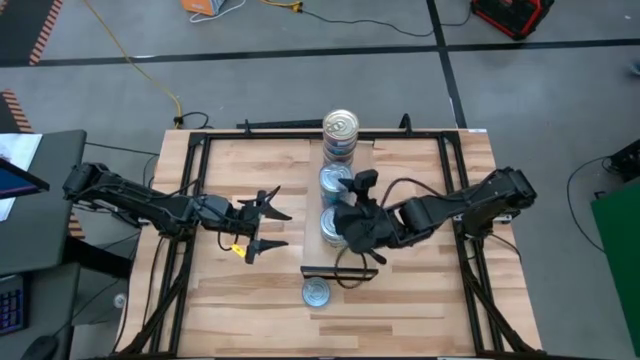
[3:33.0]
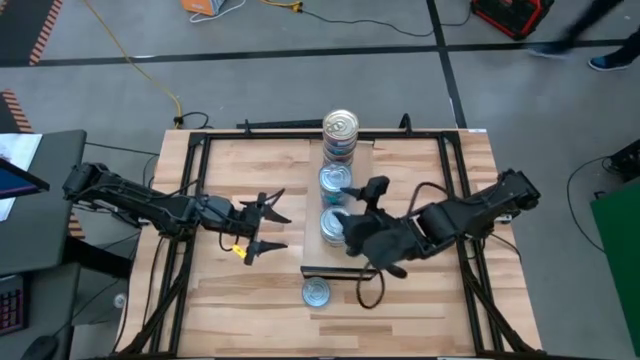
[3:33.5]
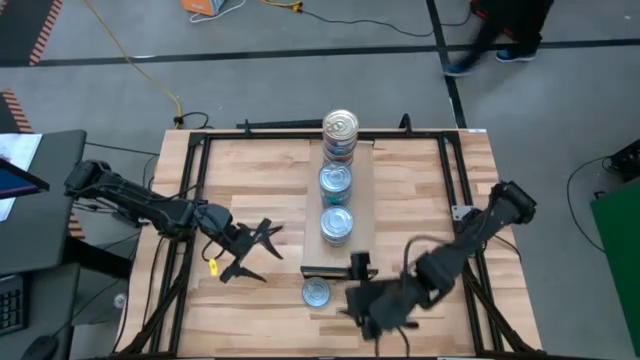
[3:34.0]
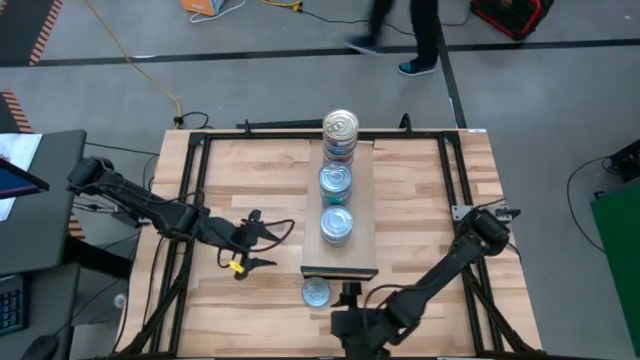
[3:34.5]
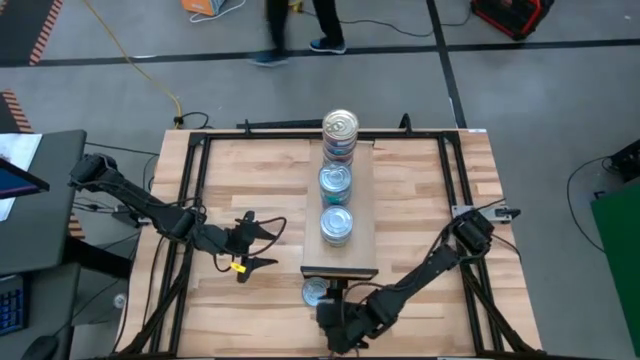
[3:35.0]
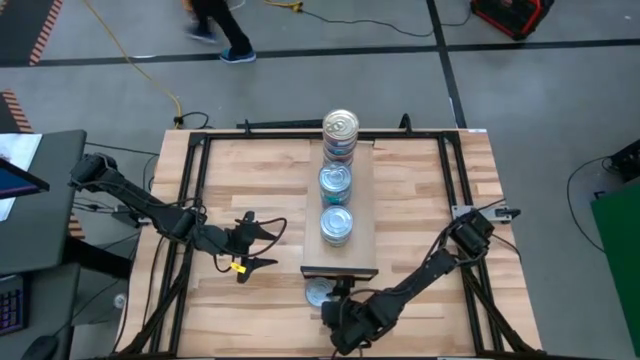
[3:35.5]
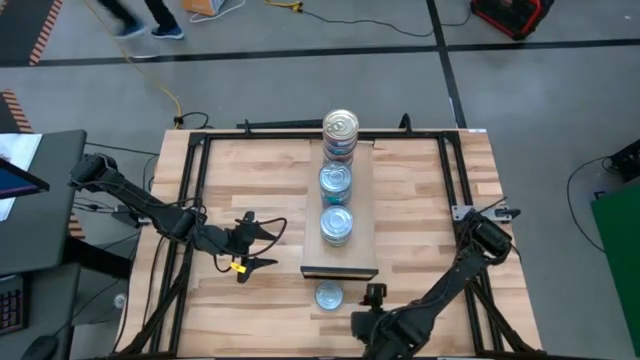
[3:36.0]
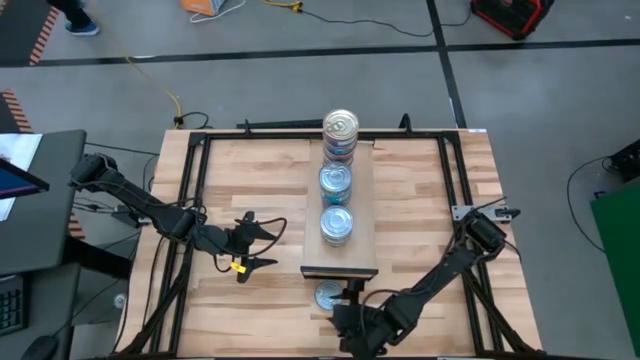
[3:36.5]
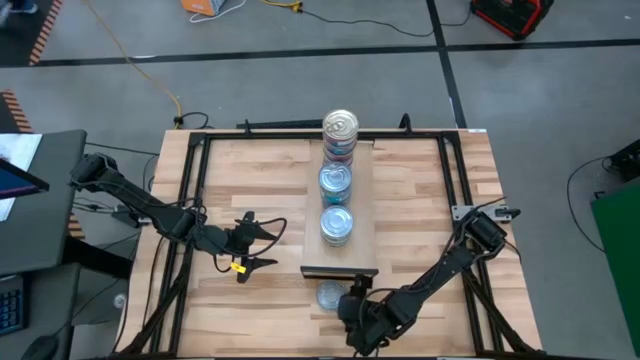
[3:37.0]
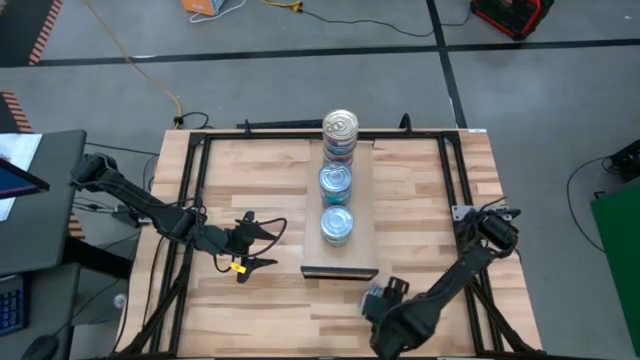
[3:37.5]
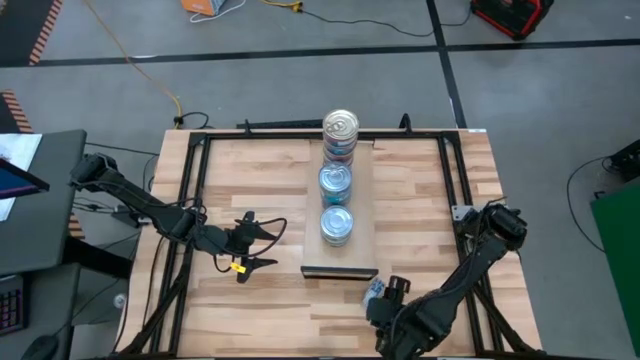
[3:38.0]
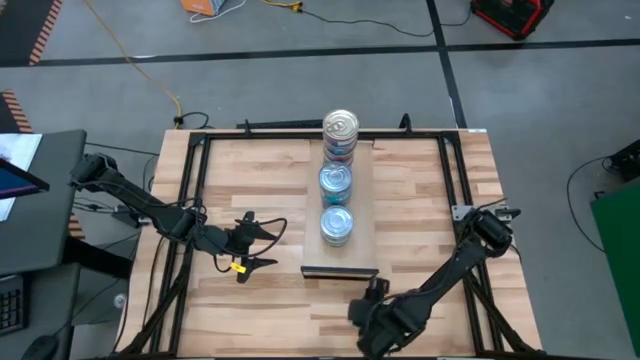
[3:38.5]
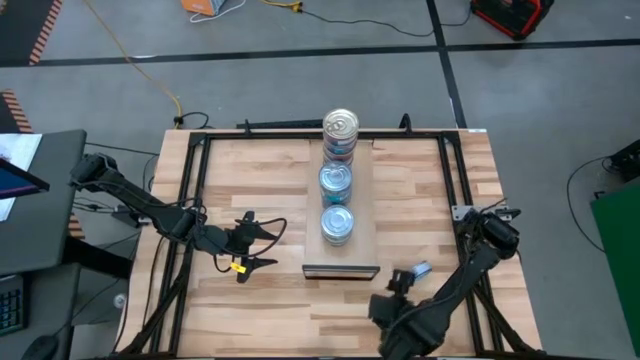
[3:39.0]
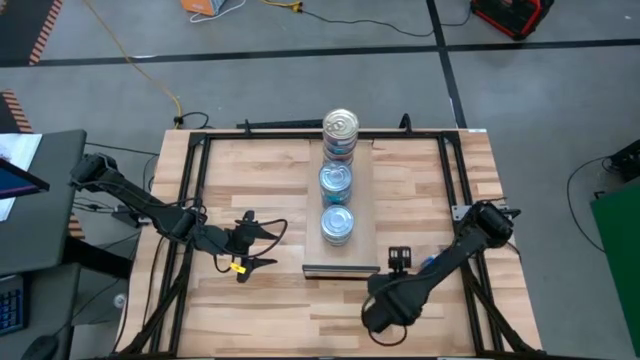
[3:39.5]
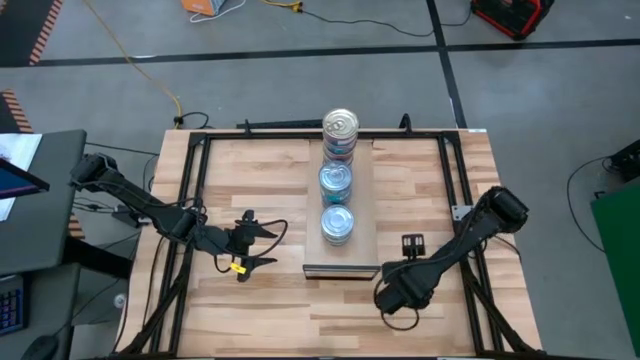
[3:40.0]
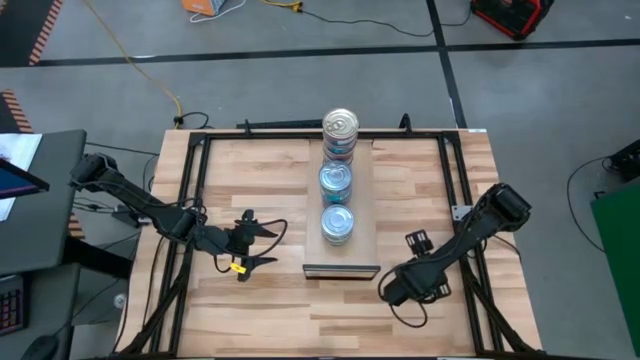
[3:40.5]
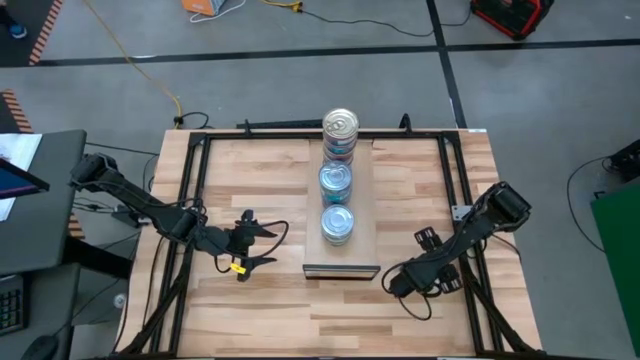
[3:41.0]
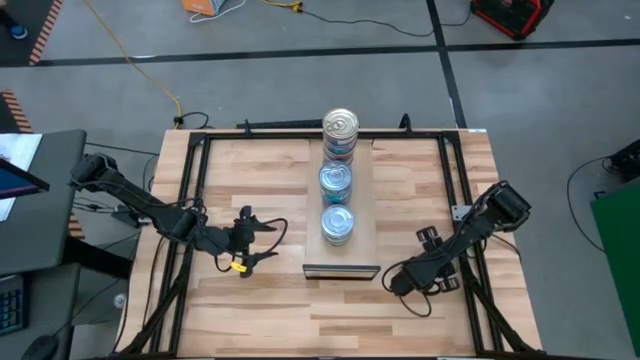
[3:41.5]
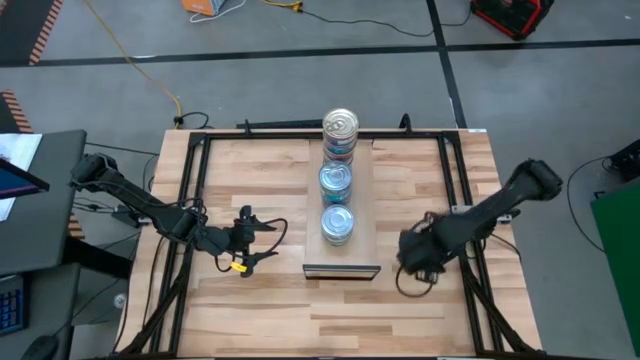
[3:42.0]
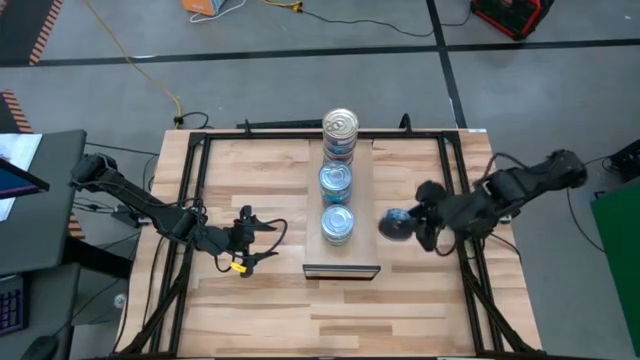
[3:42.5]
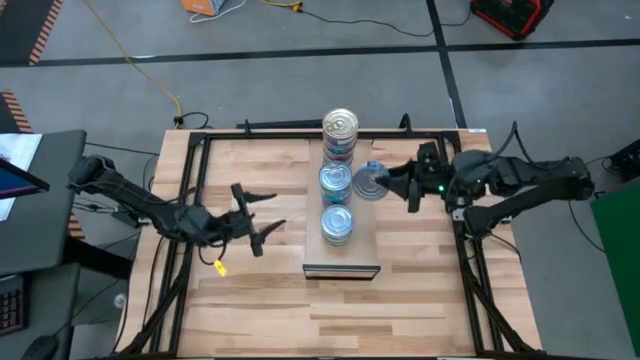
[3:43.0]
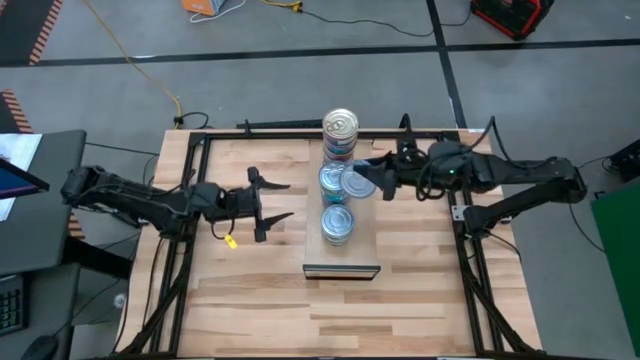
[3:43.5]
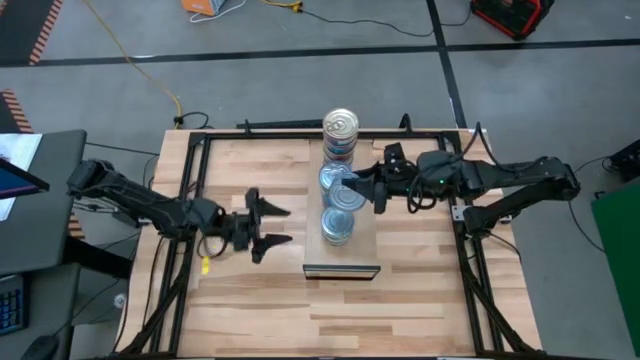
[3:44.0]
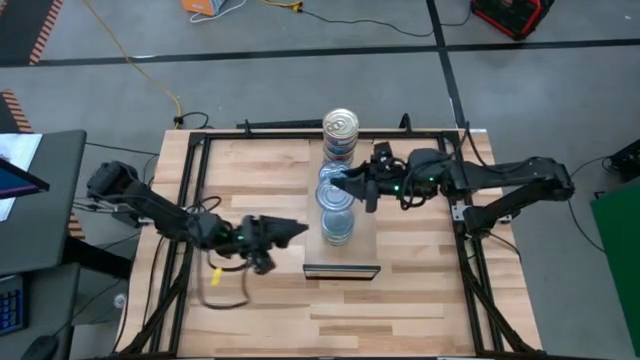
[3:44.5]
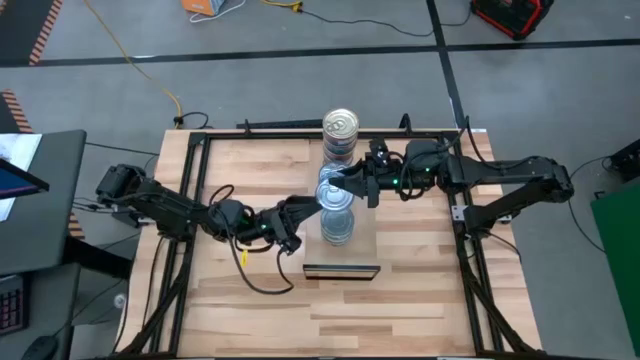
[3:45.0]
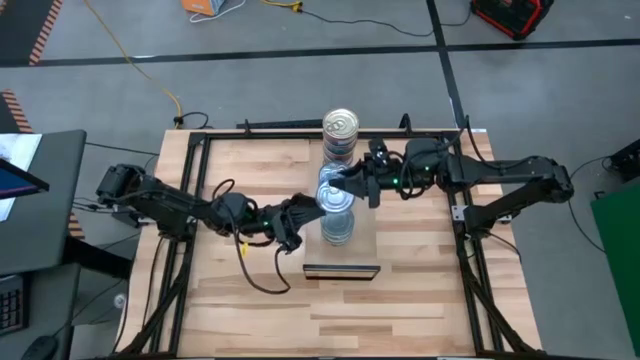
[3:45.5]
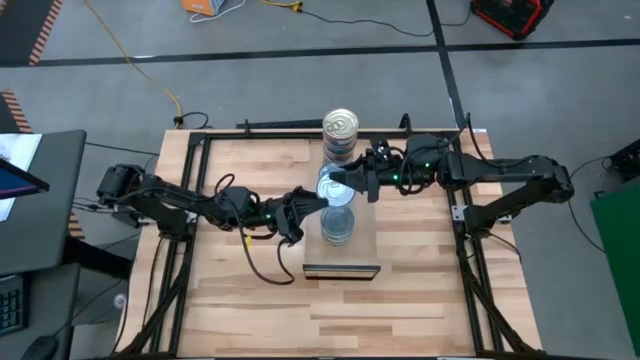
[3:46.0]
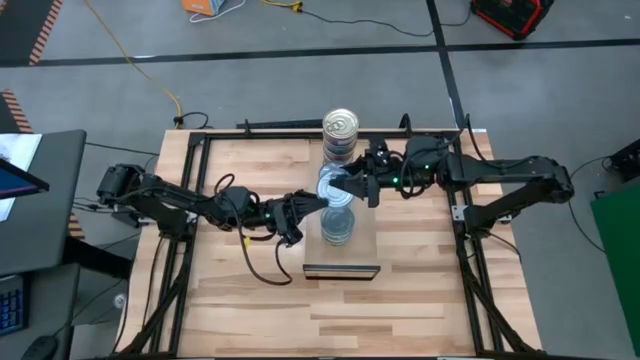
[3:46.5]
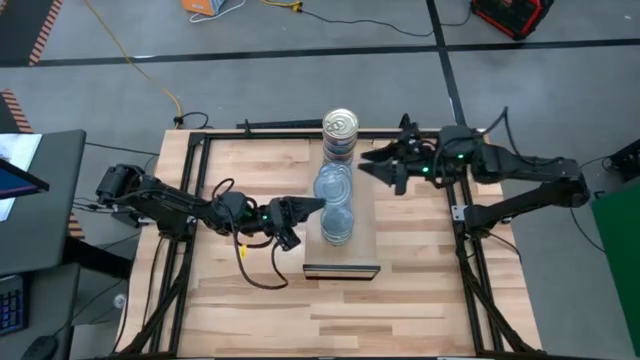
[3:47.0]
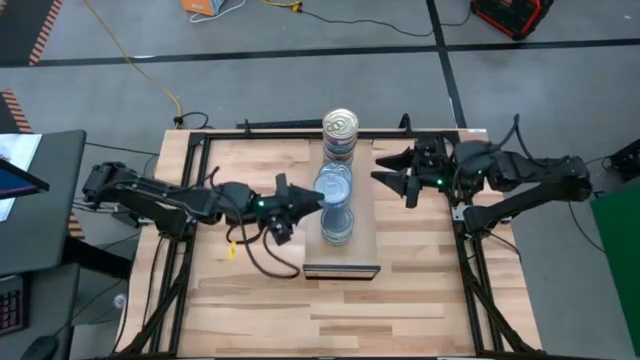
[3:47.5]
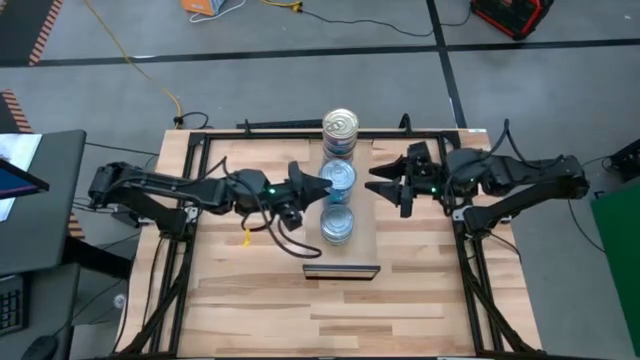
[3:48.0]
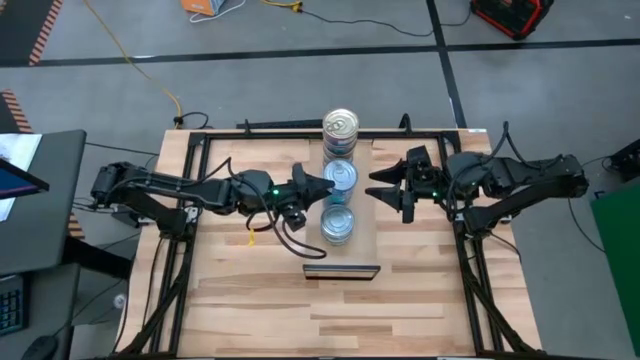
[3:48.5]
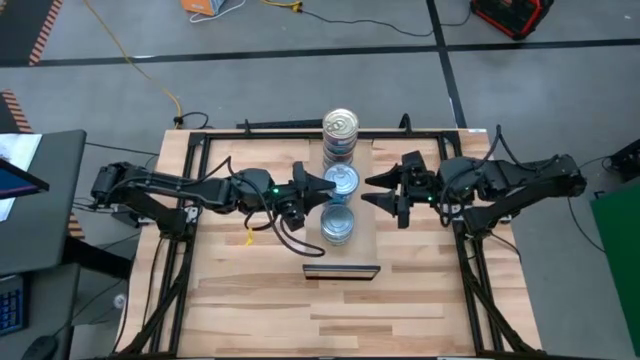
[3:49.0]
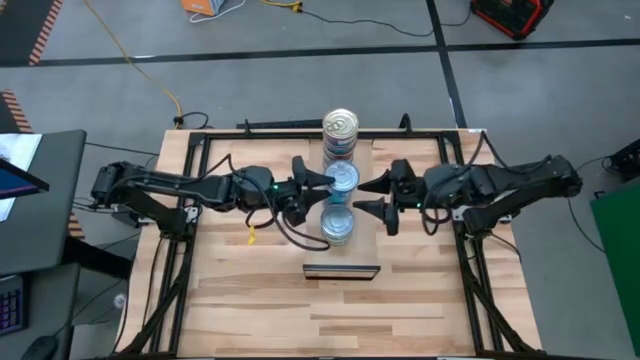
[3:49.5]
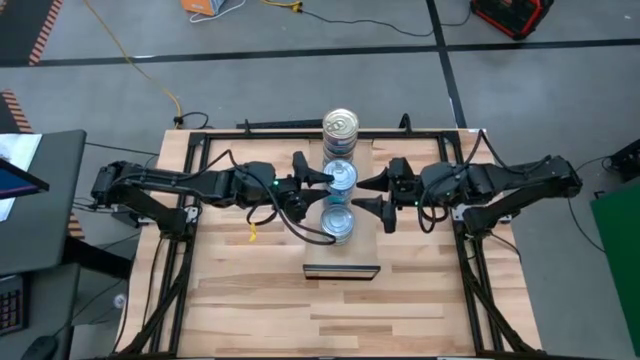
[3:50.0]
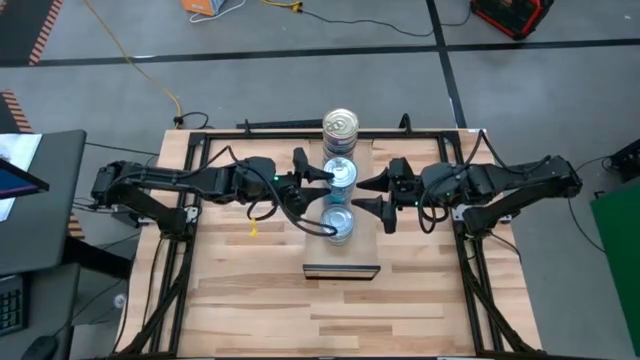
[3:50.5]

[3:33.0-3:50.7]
Task: Stack canned seafood by type on shelf
Stack the blue tuna can on the shelf on top of the green tuna can

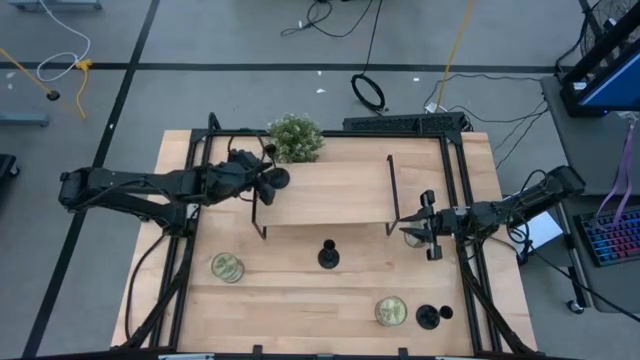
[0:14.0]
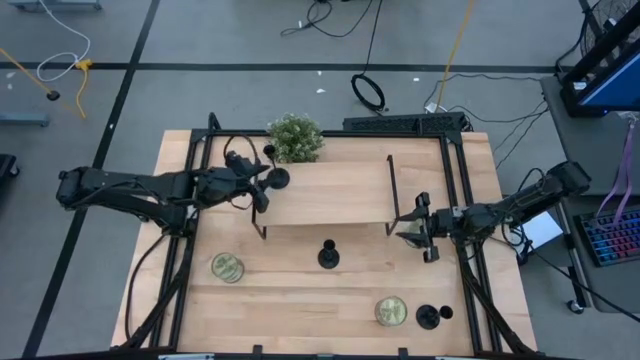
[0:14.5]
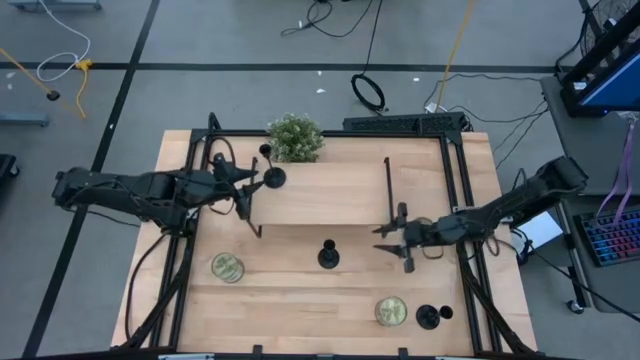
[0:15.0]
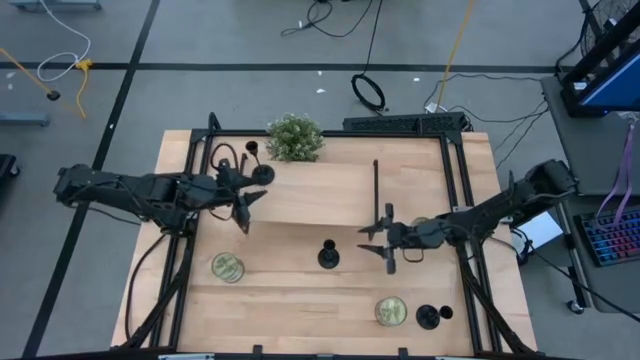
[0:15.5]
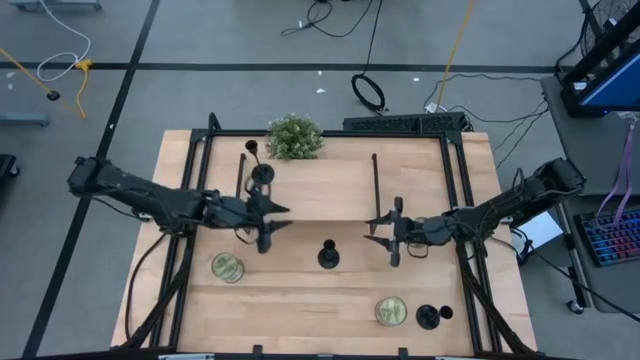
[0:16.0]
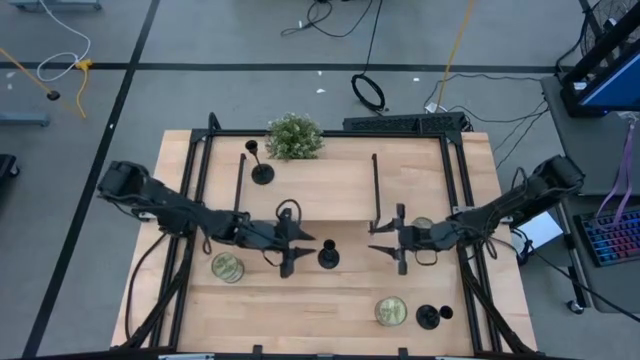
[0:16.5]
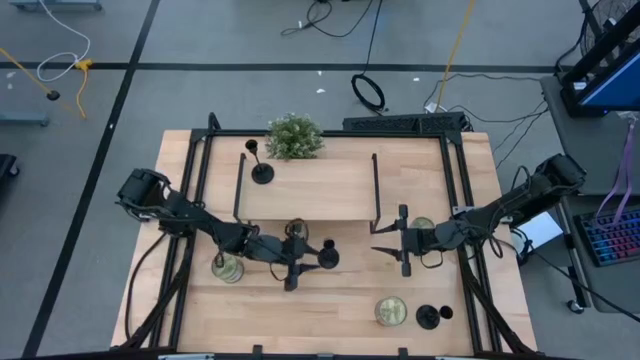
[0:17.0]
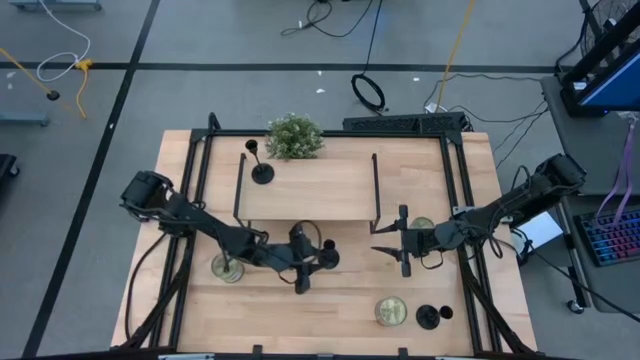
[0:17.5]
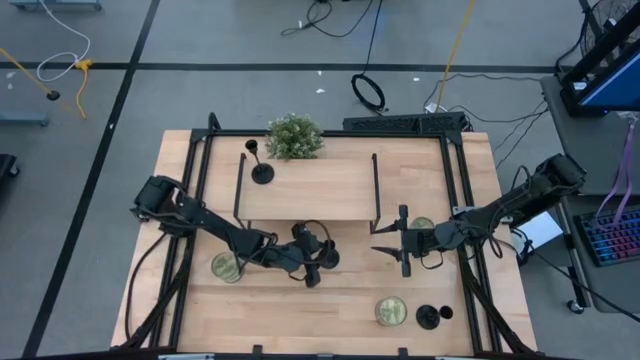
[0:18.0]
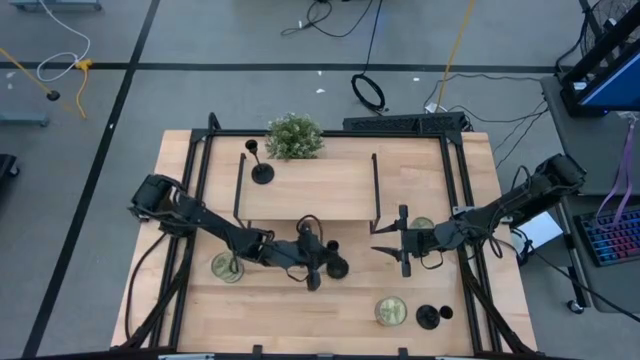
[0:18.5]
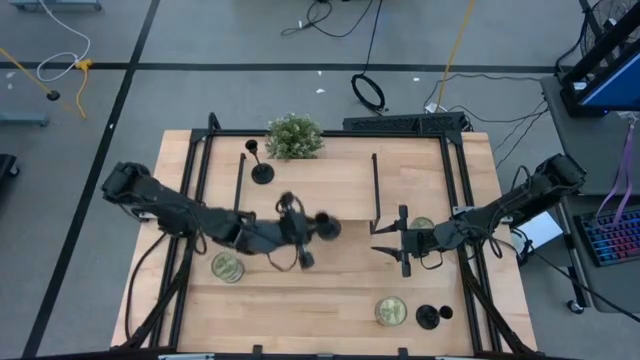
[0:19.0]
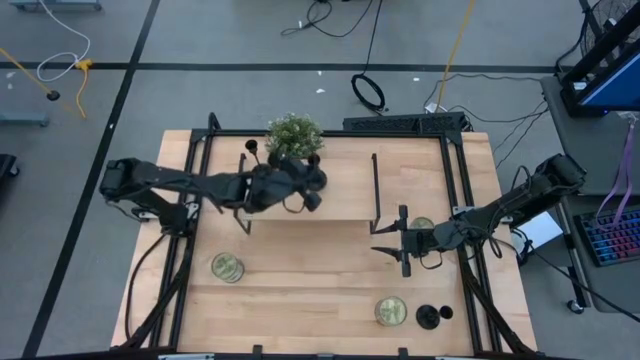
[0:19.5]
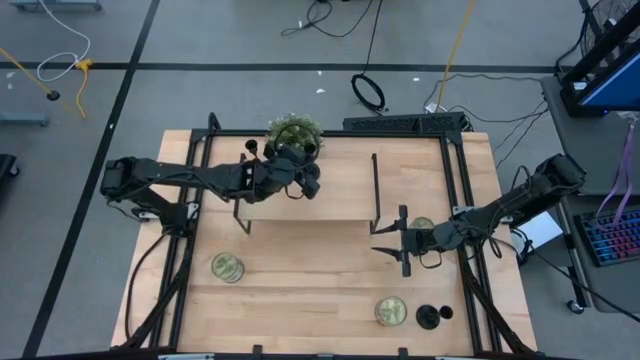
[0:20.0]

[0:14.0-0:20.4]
Task: Pick & Place candle stick holders
Put the top black candle holder on the shelf aligned with the black candle holder
